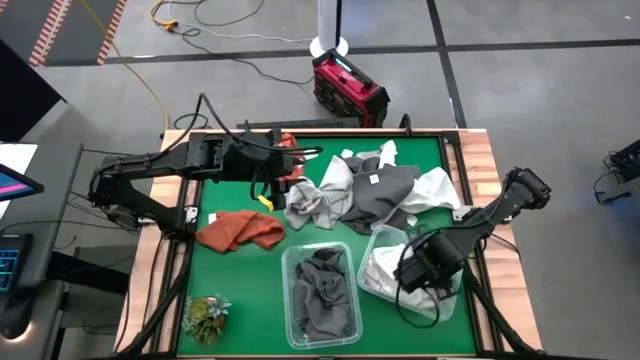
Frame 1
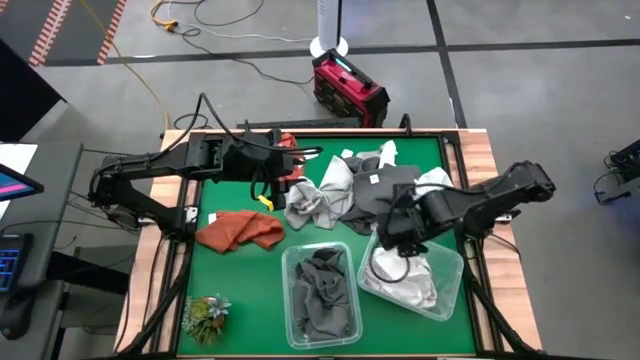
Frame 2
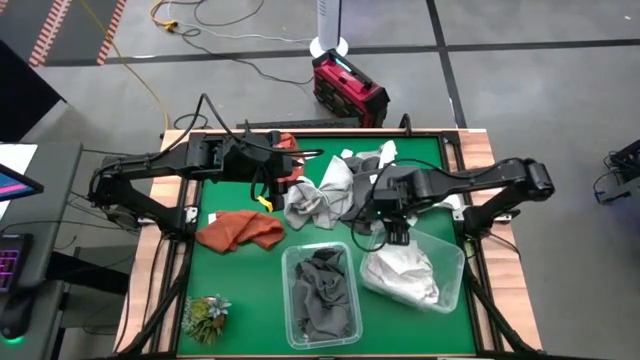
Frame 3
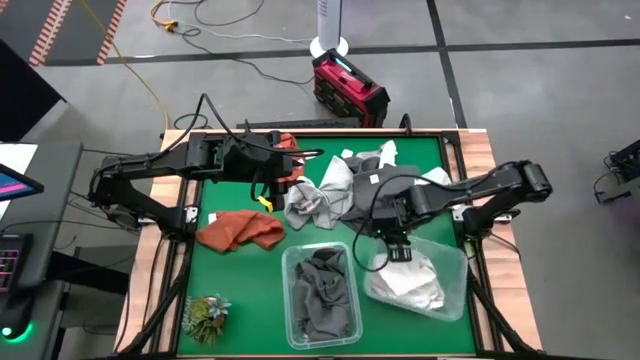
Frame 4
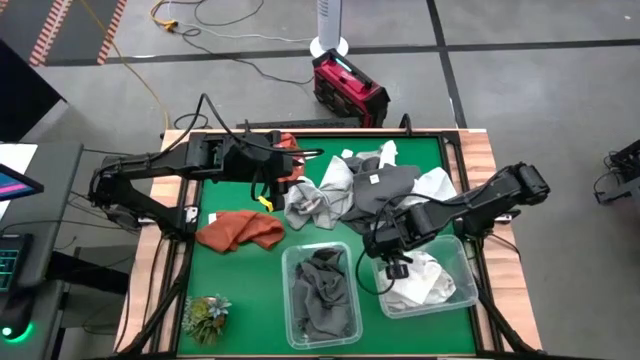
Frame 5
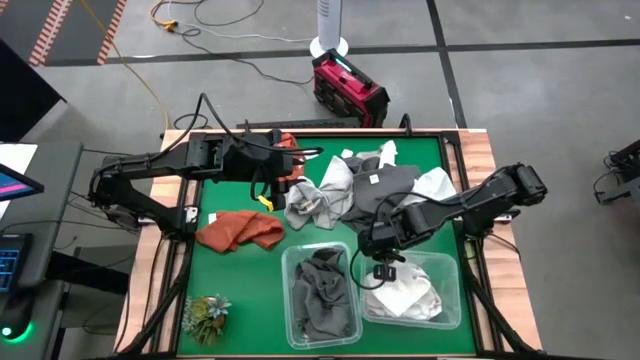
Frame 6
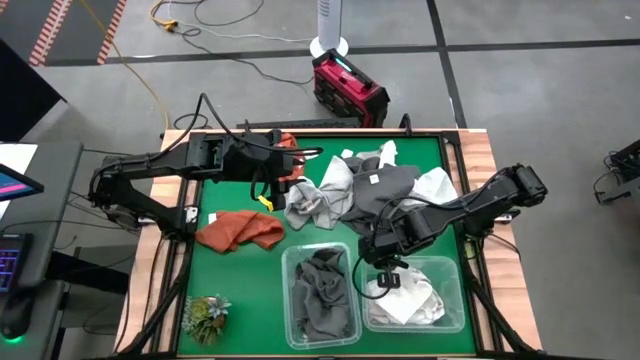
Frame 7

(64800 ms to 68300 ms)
Task: Sort towels by color in basket
Adjust the right transparent bin

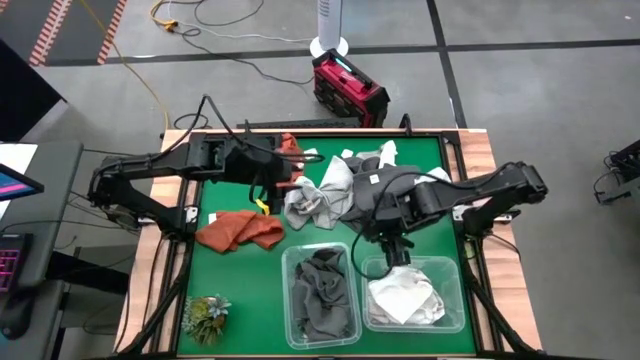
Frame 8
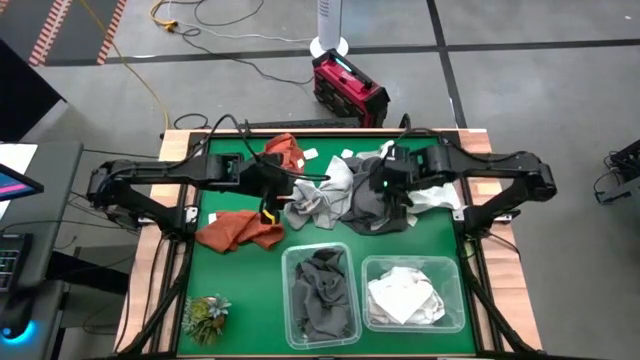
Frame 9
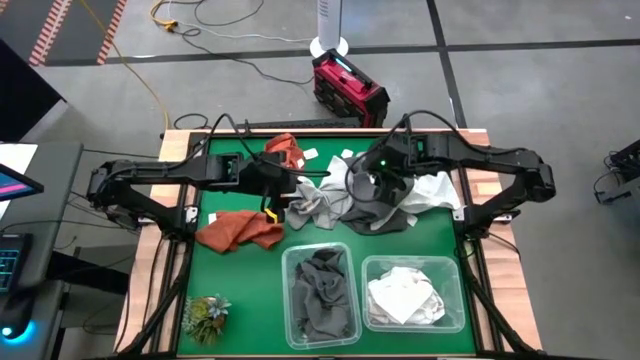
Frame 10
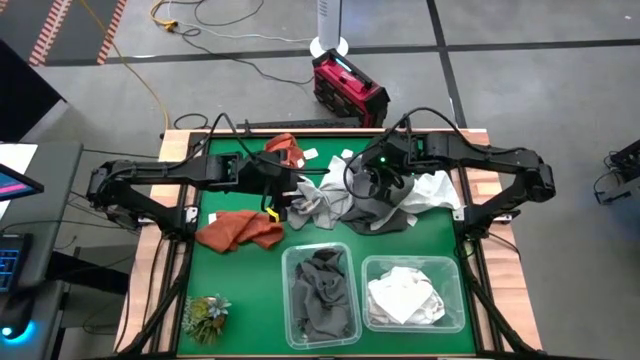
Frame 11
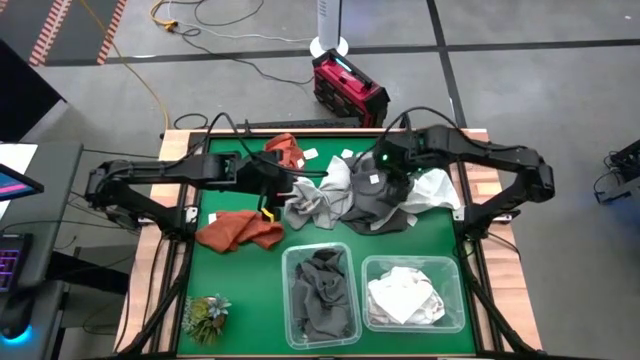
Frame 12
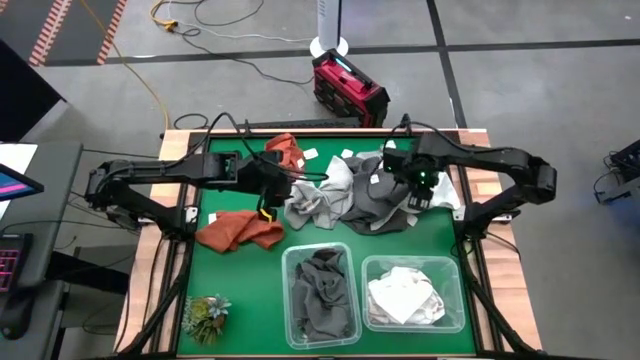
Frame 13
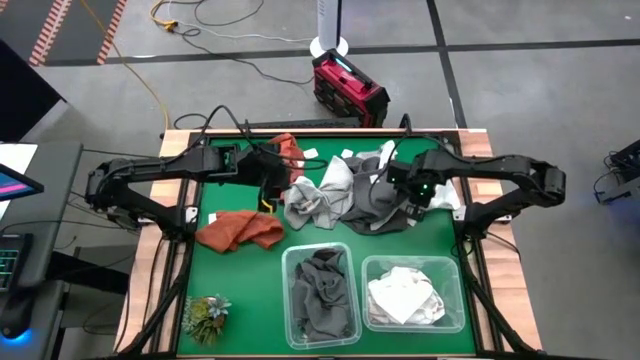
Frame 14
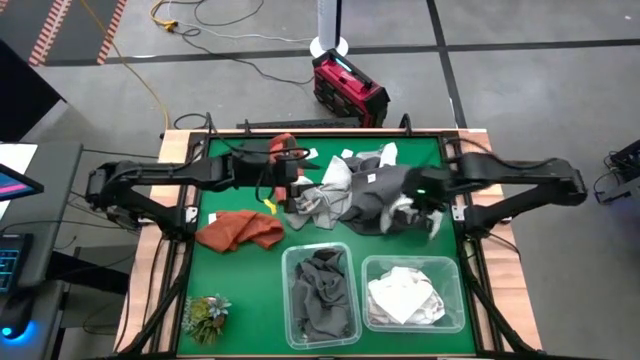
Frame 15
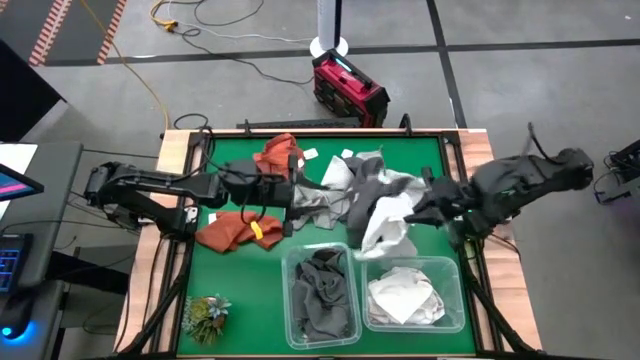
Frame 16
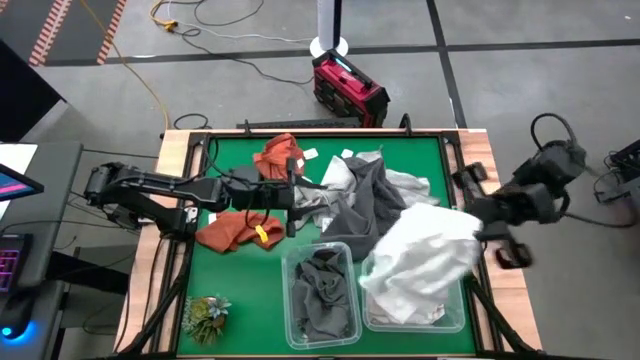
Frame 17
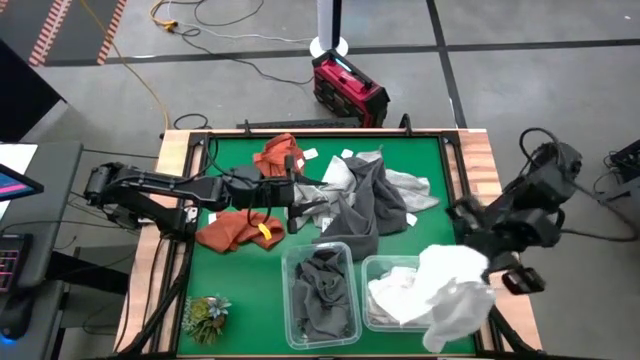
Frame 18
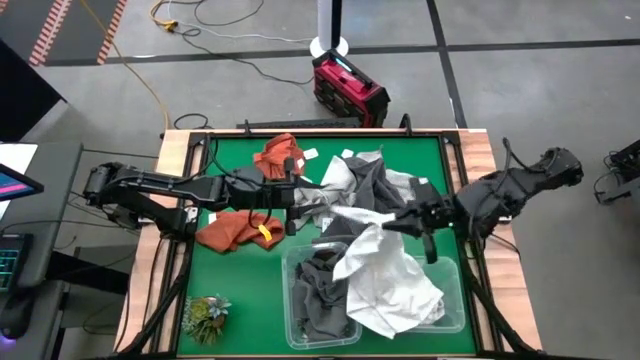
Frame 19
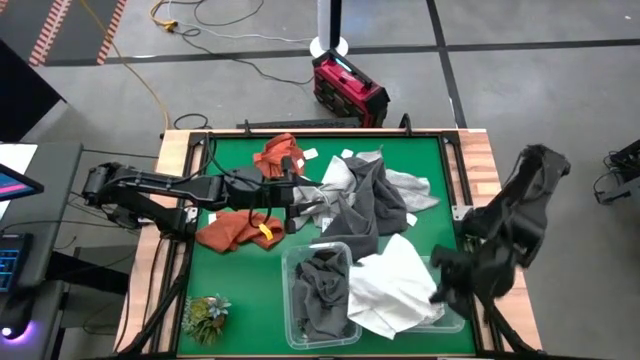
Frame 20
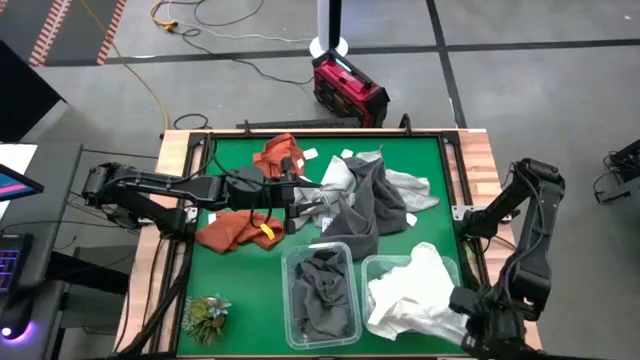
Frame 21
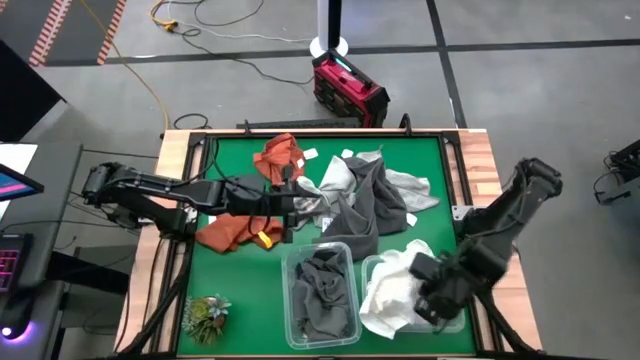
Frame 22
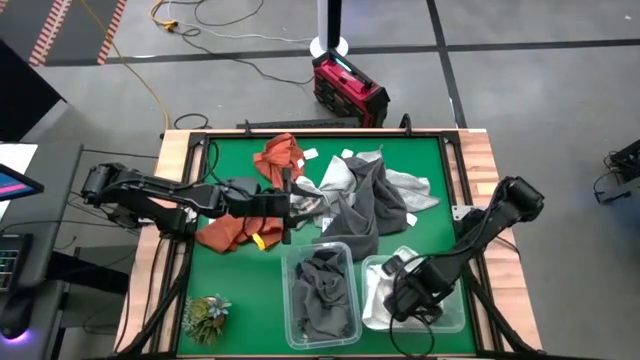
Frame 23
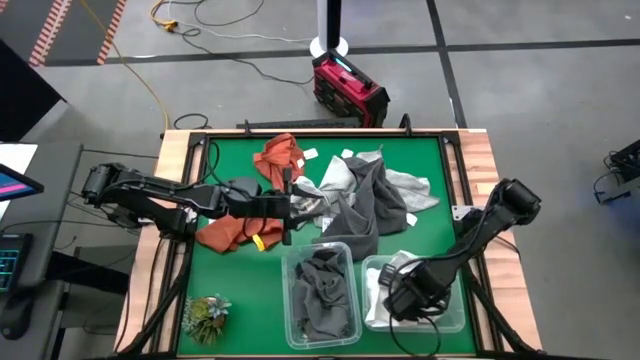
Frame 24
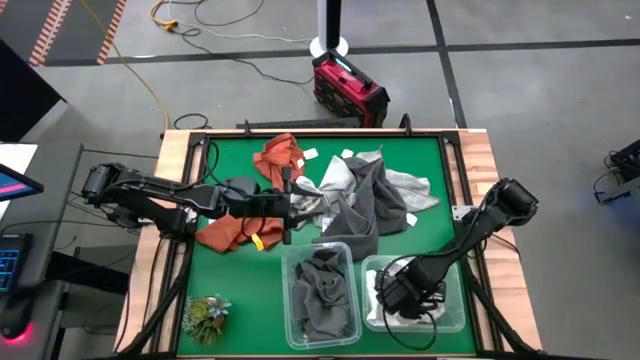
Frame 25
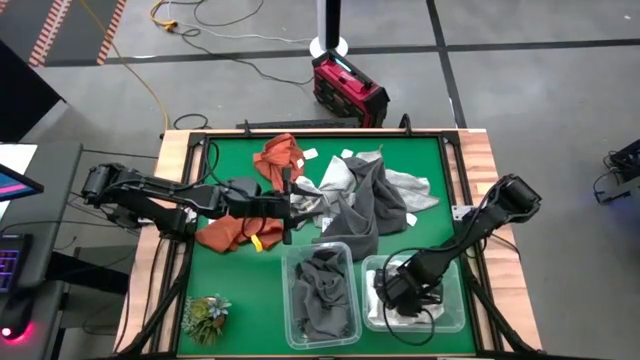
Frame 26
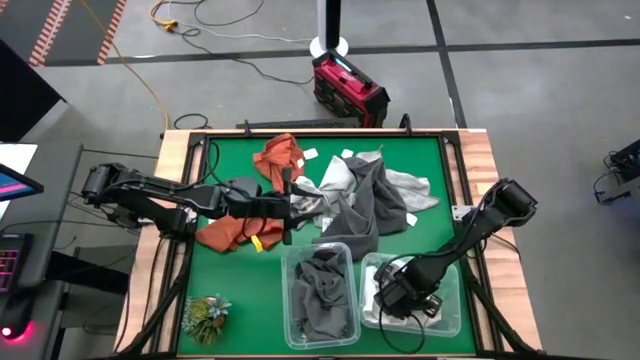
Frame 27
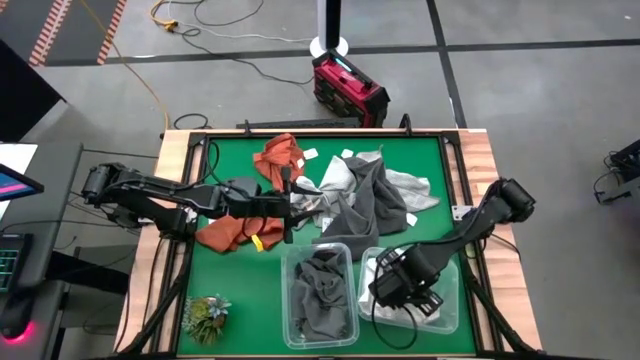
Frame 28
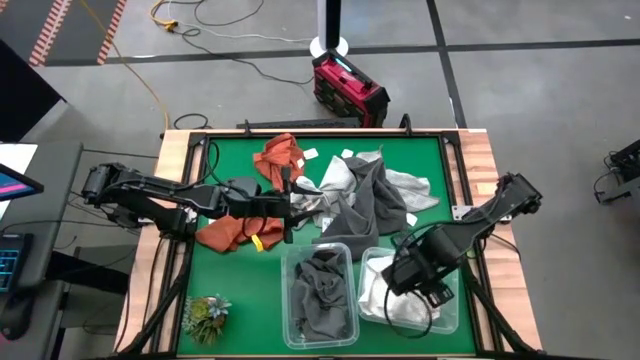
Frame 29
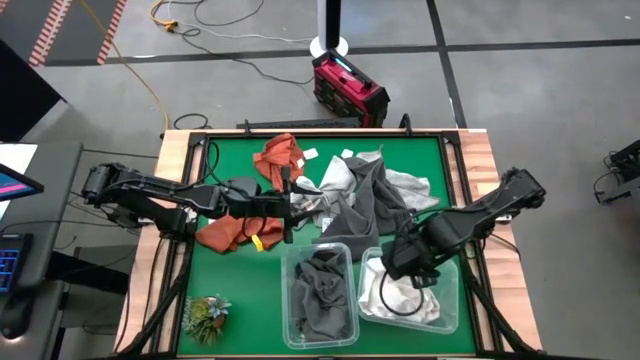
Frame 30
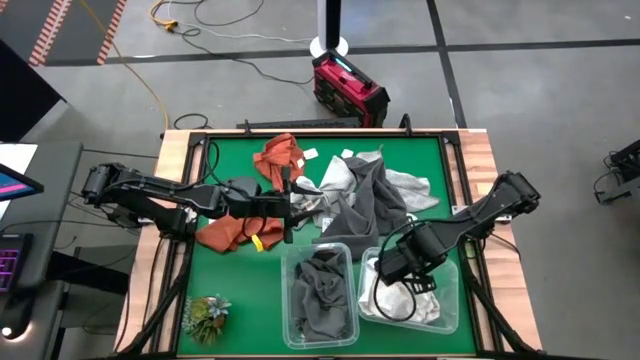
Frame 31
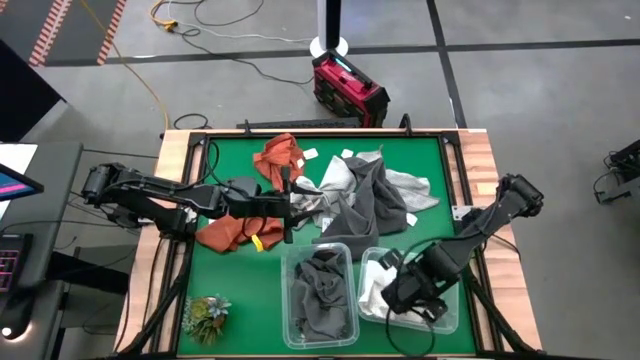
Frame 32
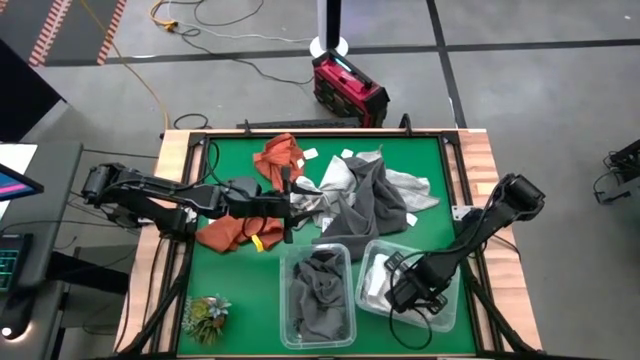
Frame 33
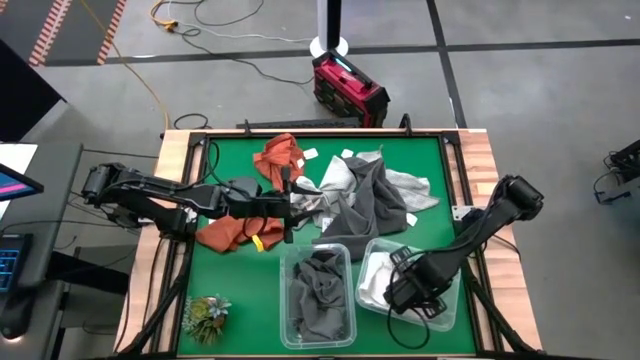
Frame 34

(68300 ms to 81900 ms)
Put the right white towel into the right transparent bin

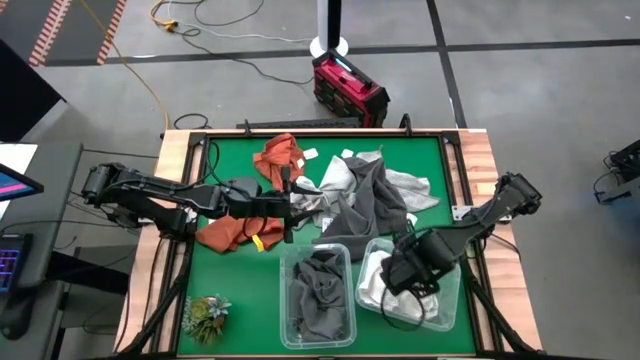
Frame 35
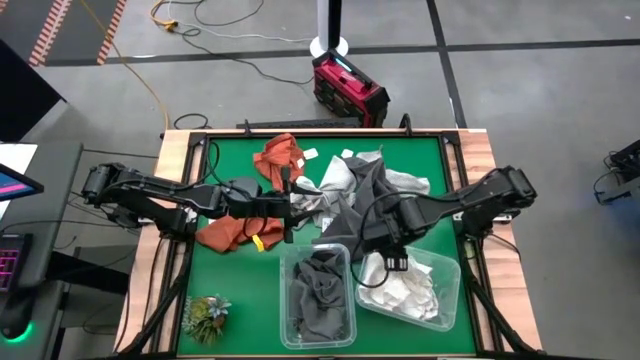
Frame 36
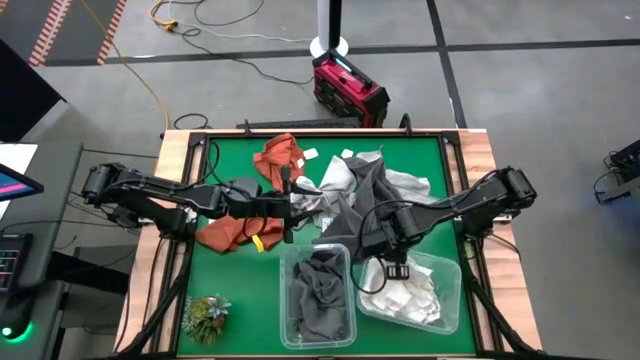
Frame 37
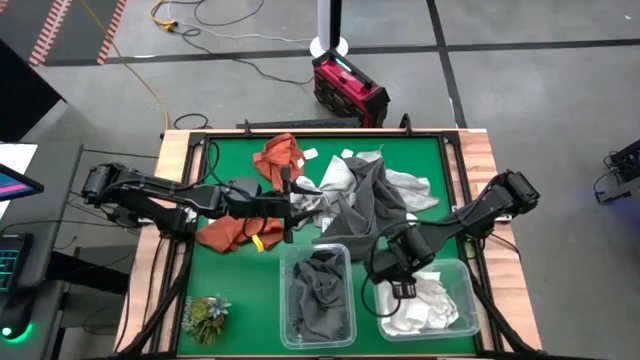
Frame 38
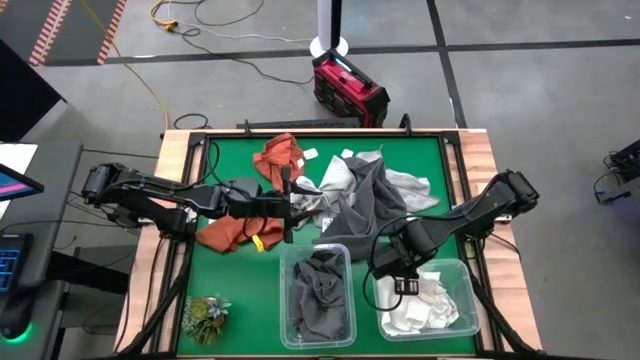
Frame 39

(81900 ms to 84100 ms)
Adjust the right transparent bin

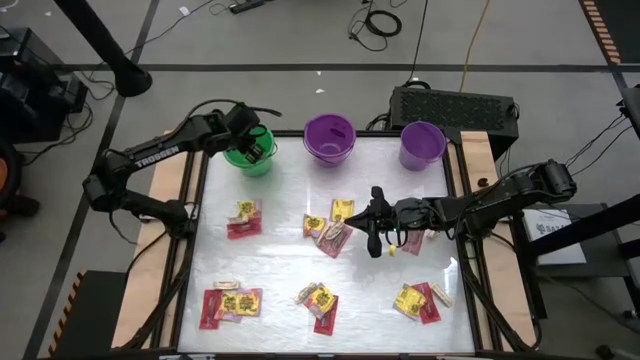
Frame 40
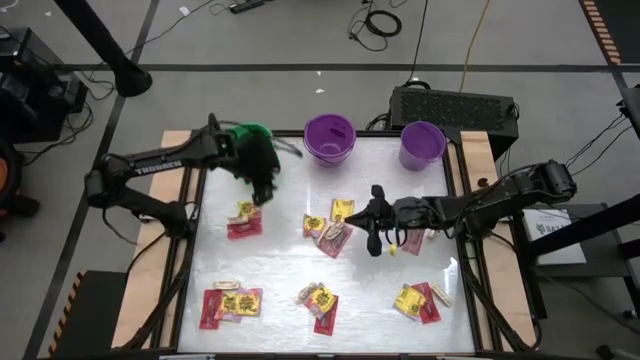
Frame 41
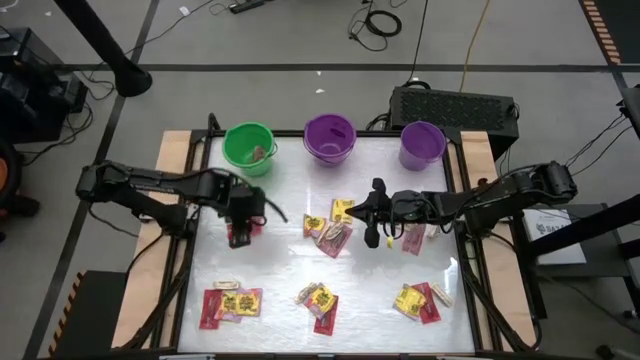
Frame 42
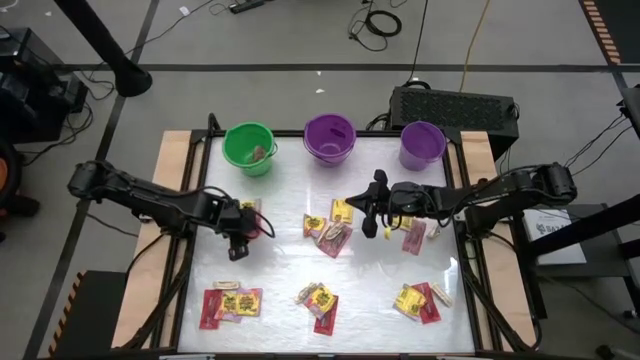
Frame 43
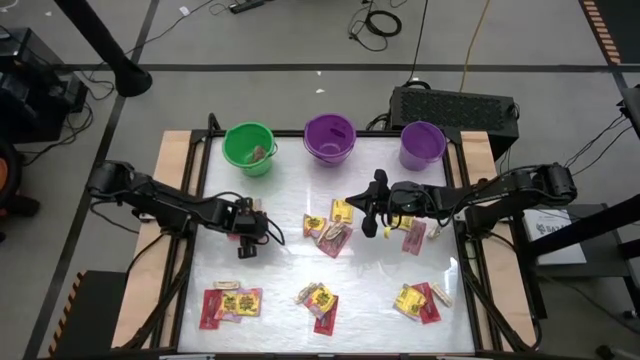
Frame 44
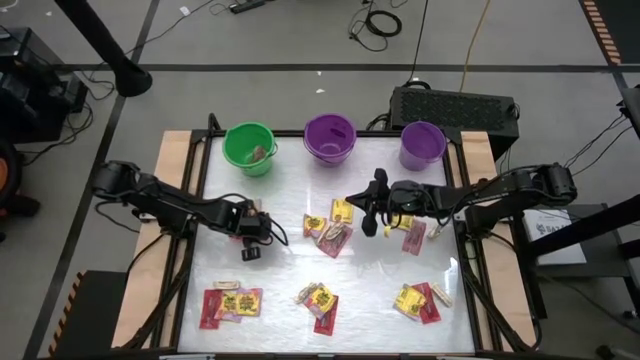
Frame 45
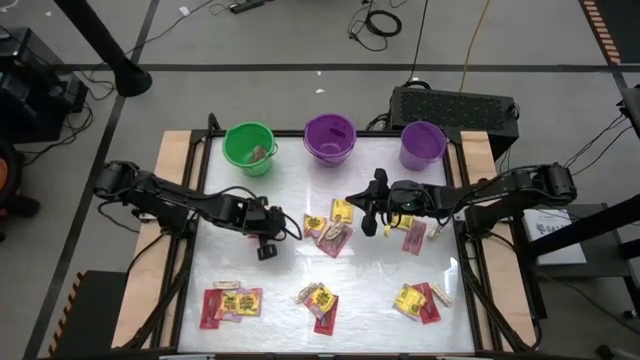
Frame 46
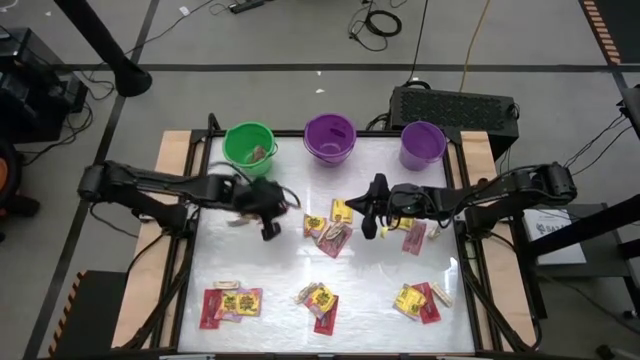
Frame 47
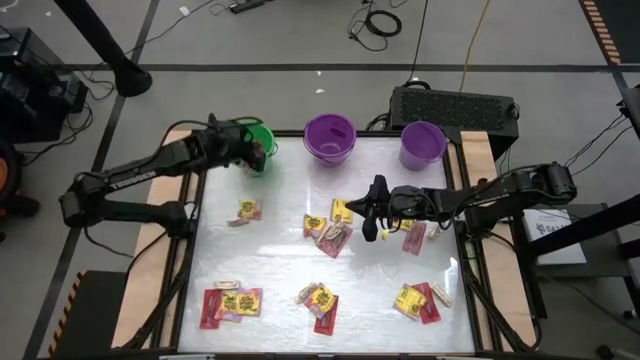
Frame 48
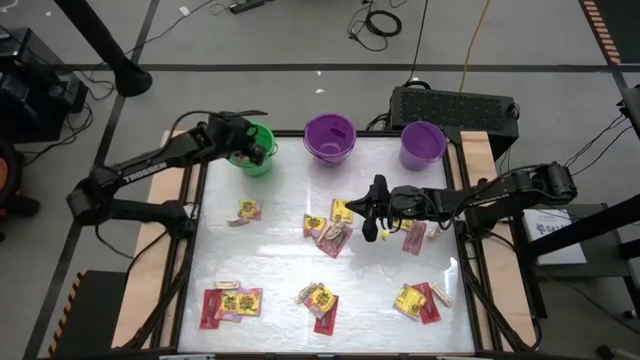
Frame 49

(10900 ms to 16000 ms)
Task: Sort candy by brand, put in halloween buckets
Put the red candy pack in the green bucket
